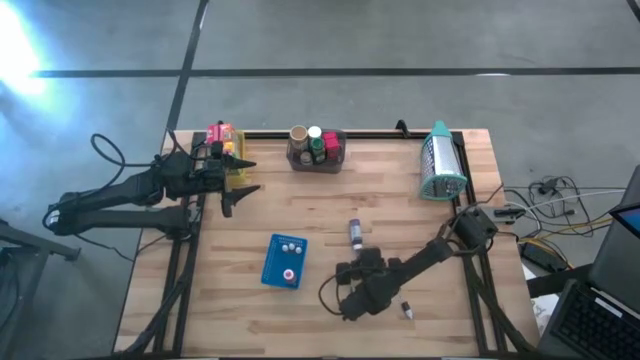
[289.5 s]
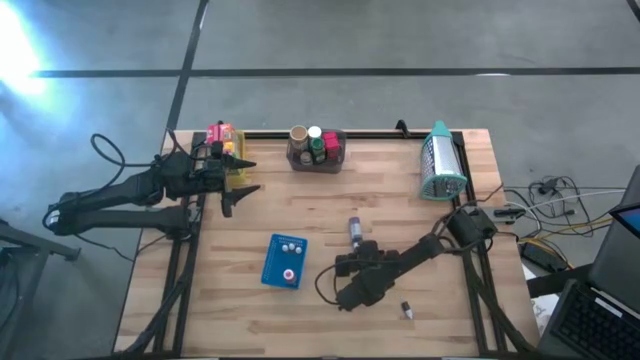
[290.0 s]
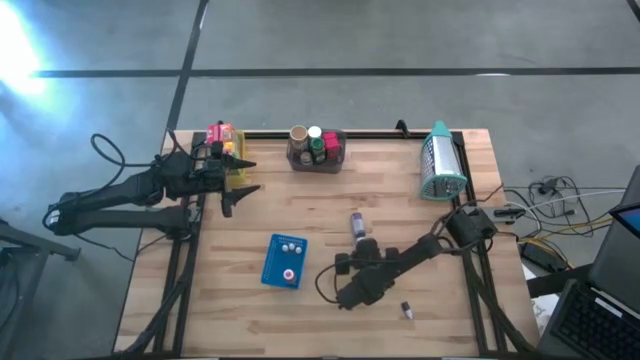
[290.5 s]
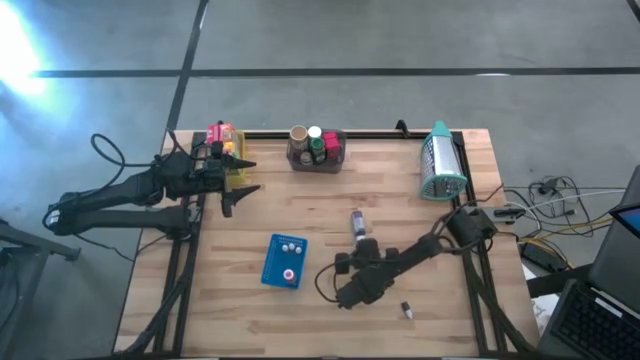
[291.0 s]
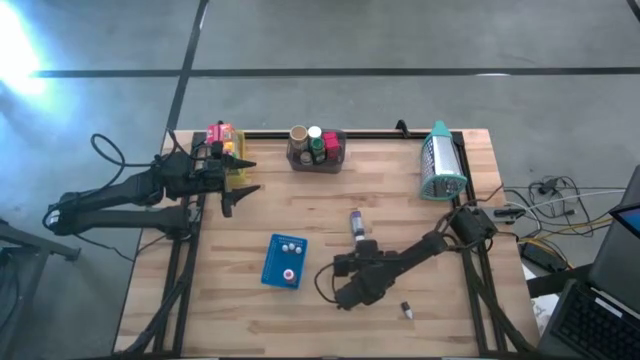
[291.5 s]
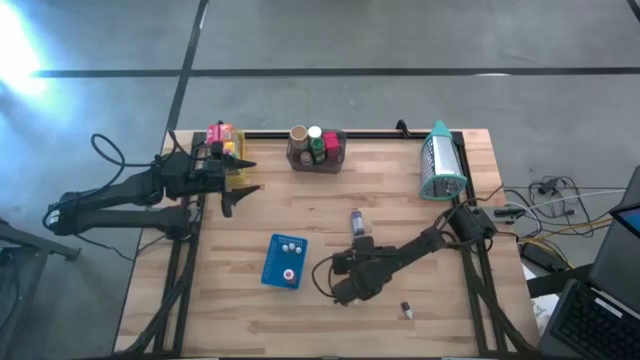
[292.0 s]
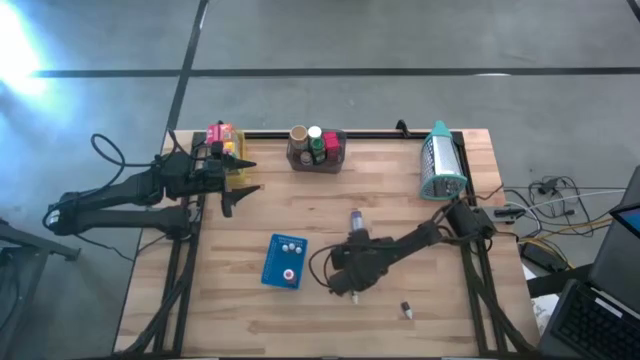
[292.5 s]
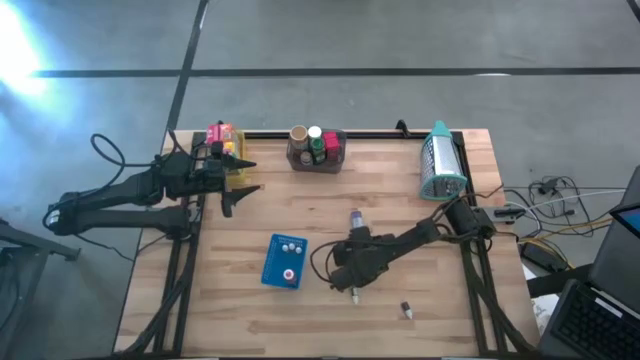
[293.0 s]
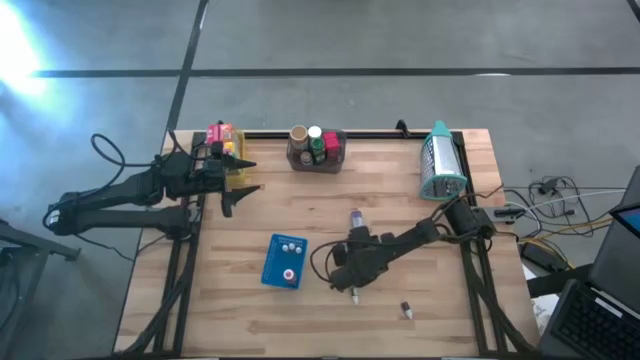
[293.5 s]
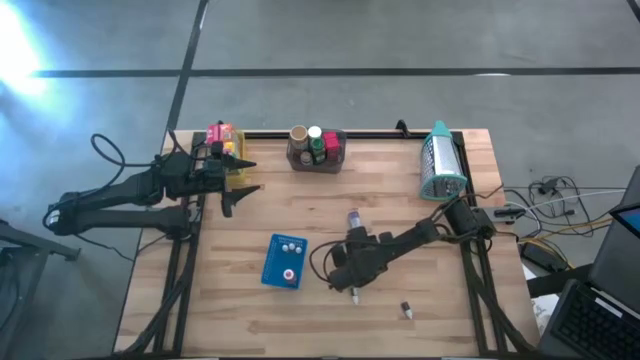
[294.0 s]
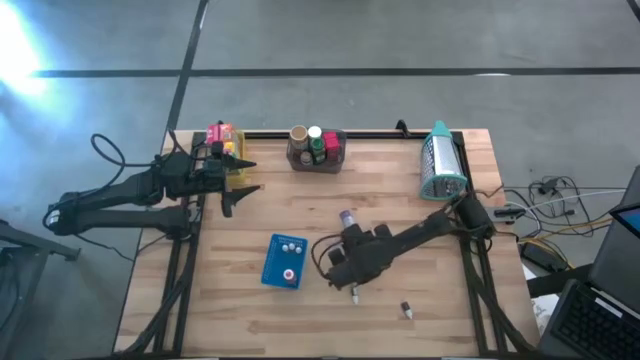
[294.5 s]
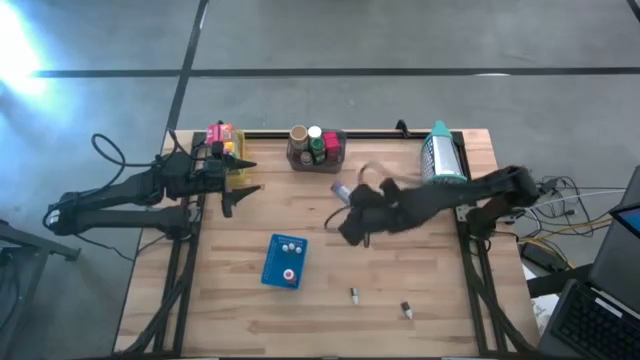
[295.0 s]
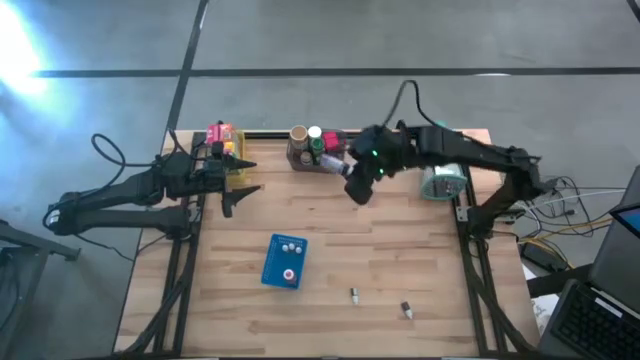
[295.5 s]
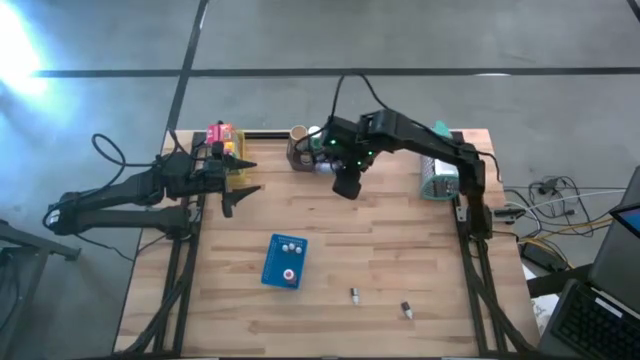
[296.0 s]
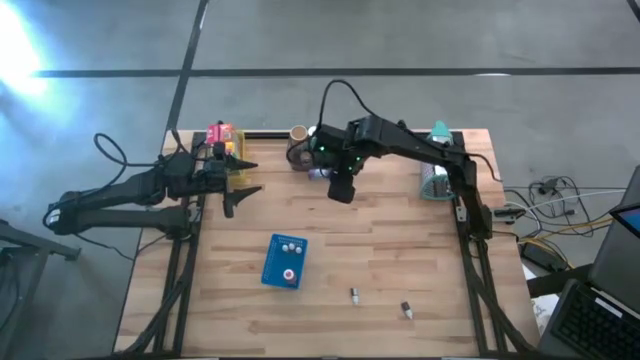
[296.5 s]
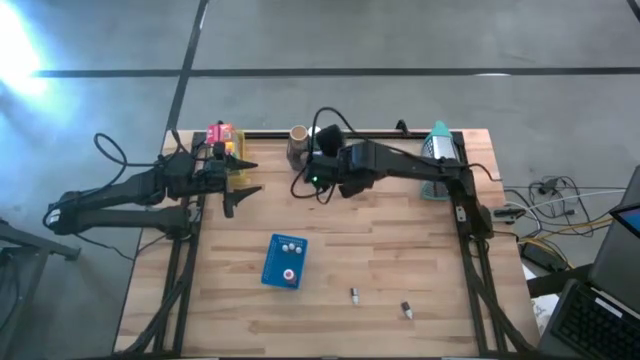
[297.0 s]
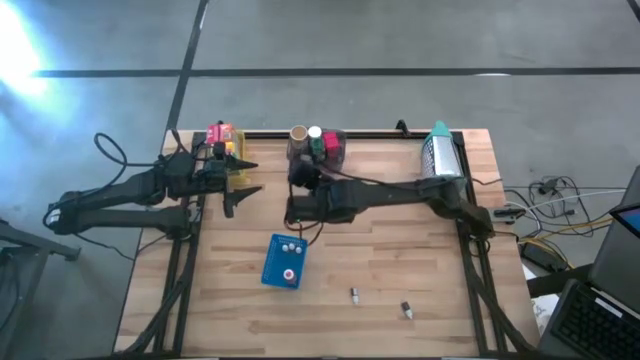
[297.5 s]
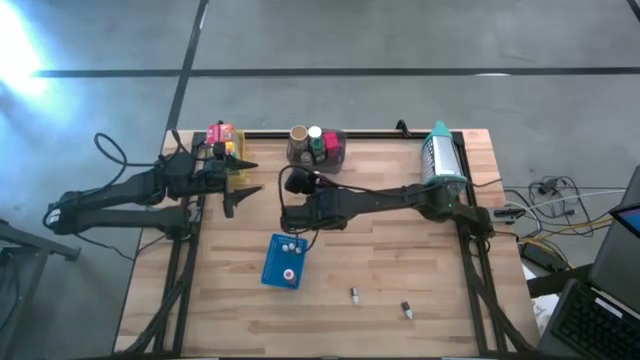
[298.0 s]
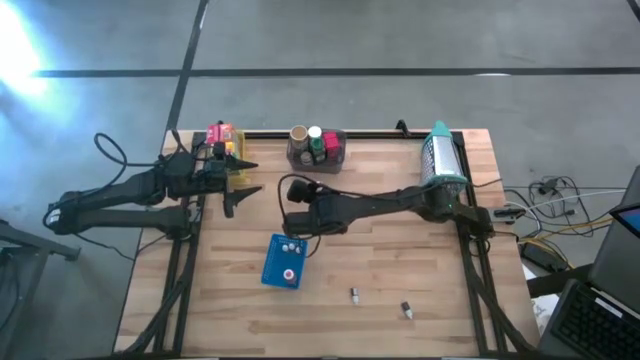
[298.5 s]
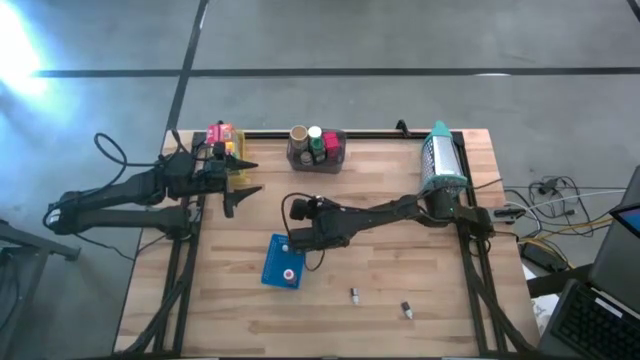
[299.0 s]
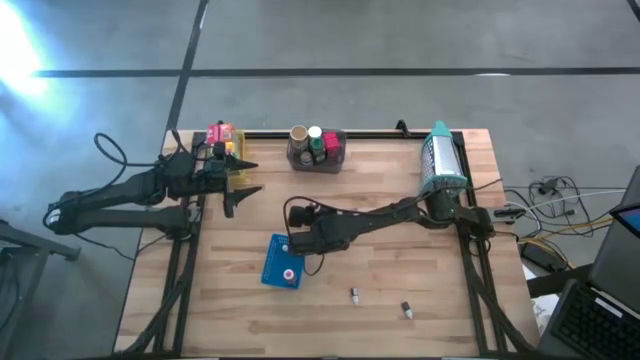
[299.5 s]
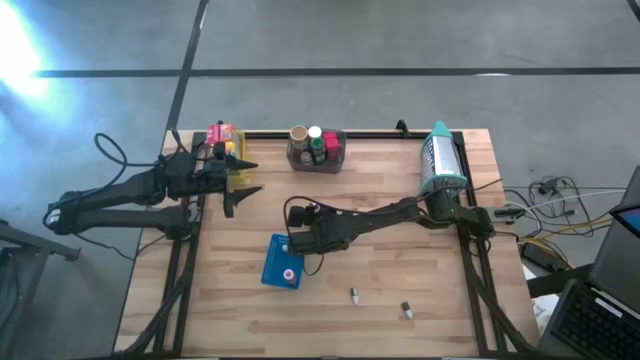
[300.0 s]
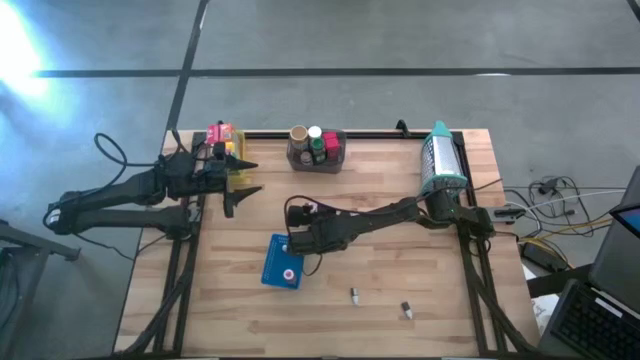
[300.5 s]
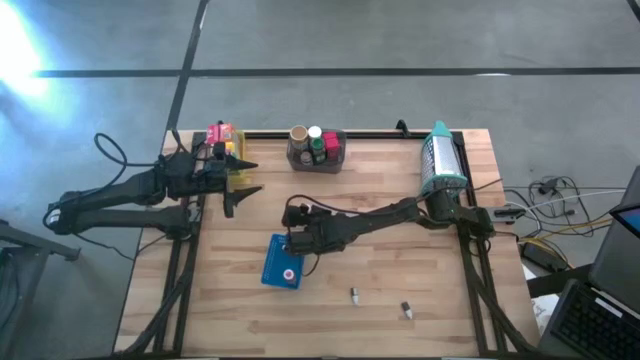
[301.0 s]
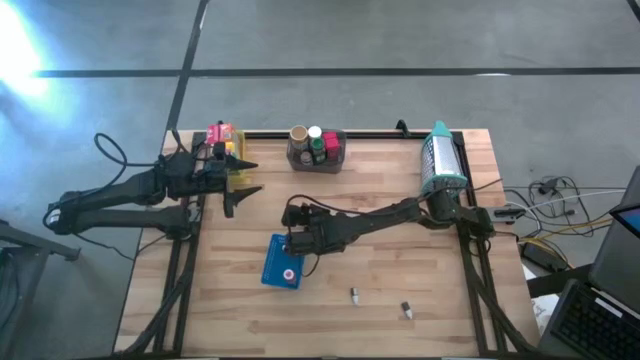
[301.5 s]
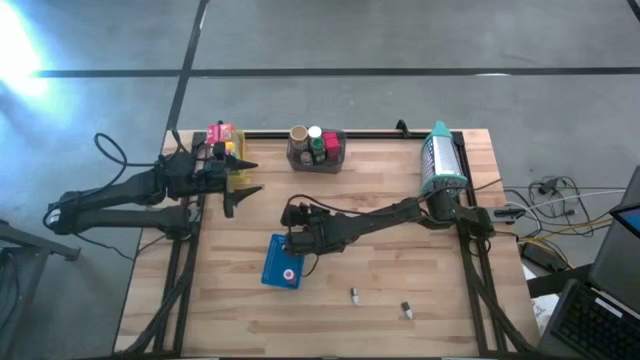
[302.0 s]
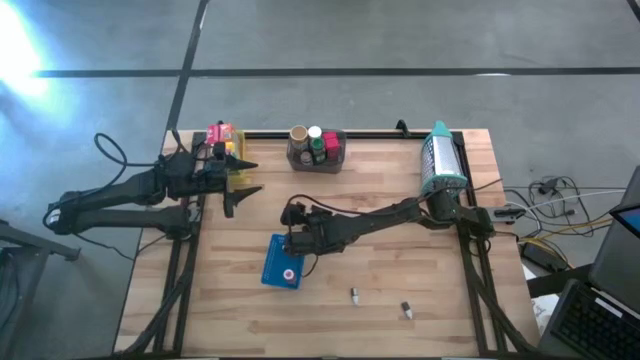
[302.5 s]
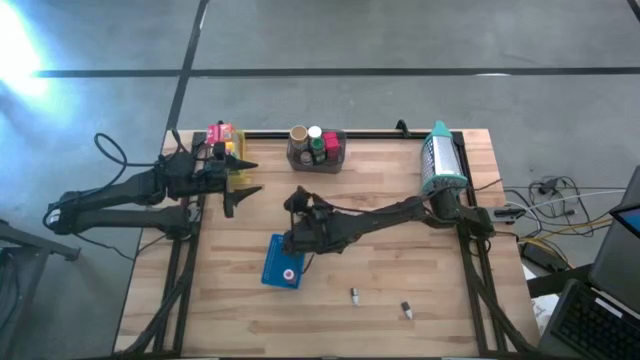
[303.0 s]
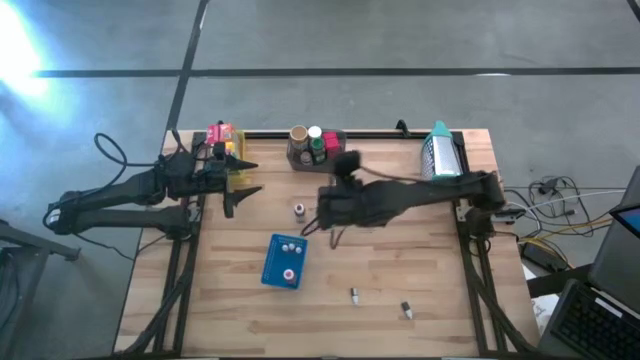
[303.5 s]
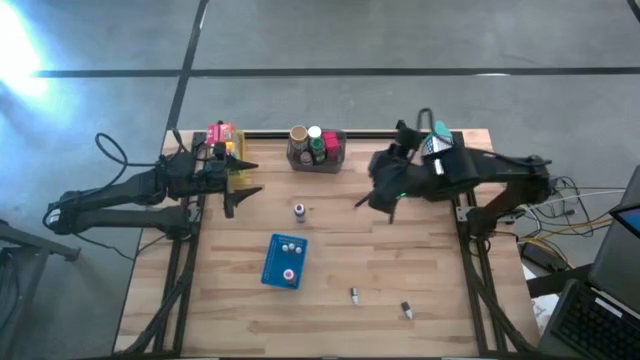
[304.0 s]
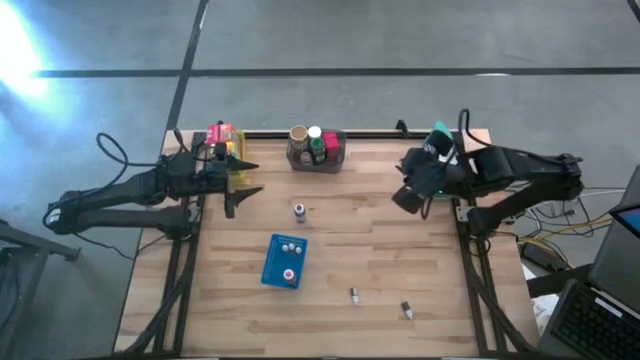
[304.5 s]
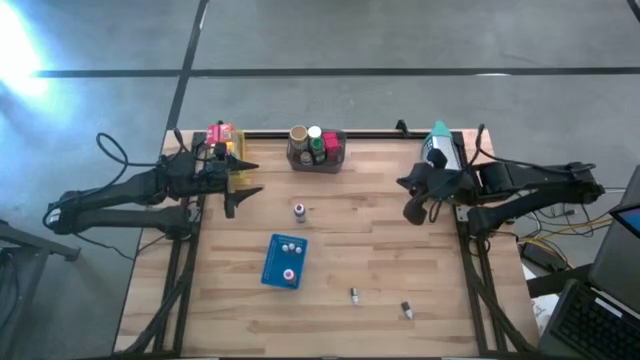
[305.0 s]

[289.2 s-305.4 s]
Task: Pick & Place Kitchen Items
Put the large purple food coloring bottle into the blue bin

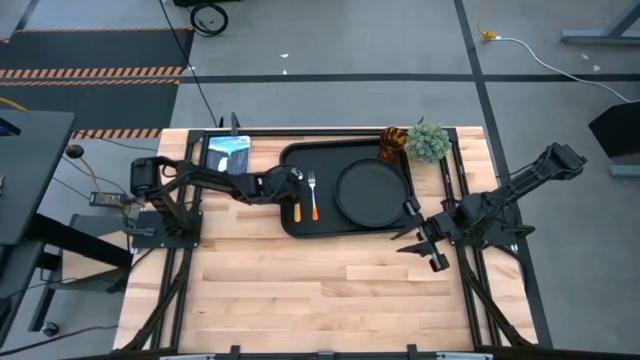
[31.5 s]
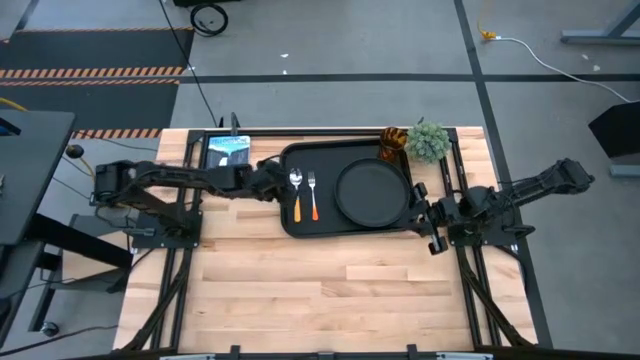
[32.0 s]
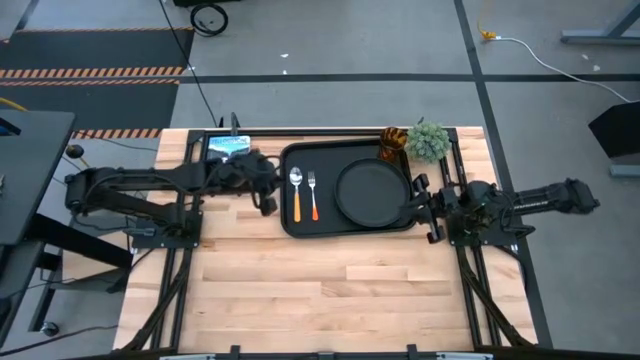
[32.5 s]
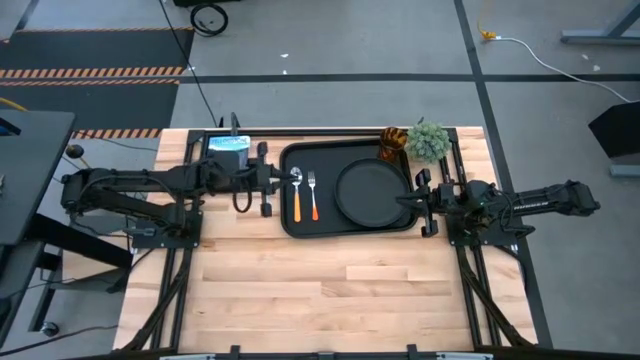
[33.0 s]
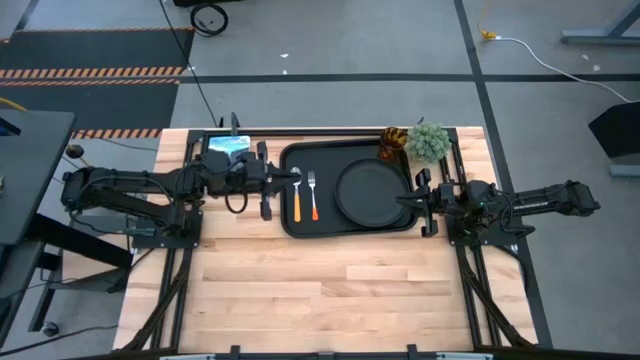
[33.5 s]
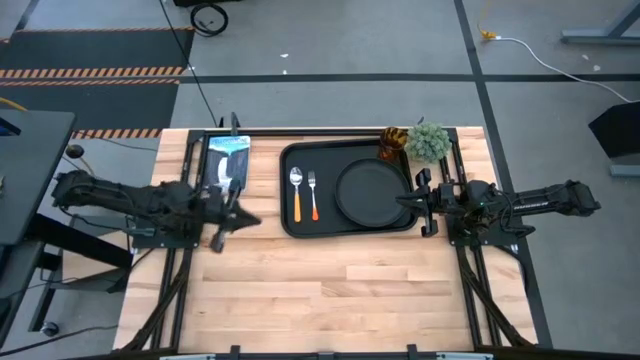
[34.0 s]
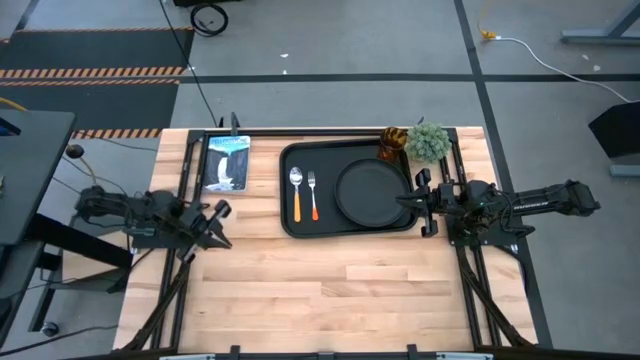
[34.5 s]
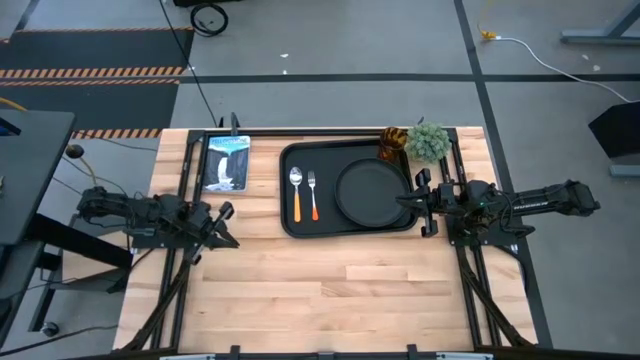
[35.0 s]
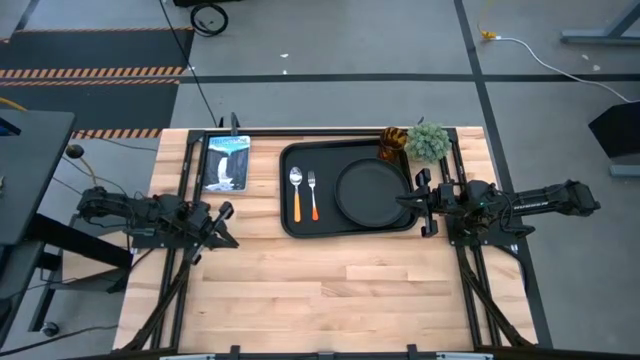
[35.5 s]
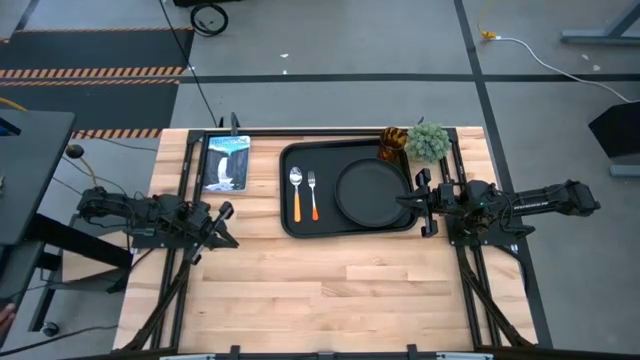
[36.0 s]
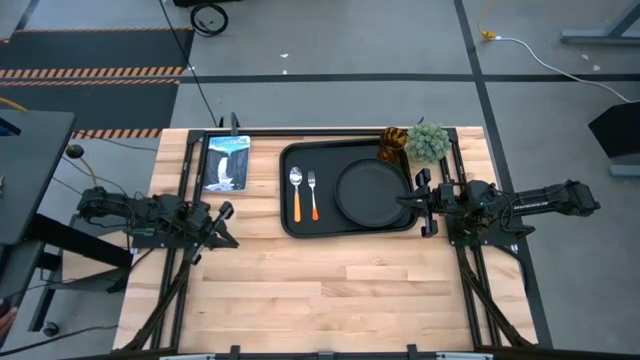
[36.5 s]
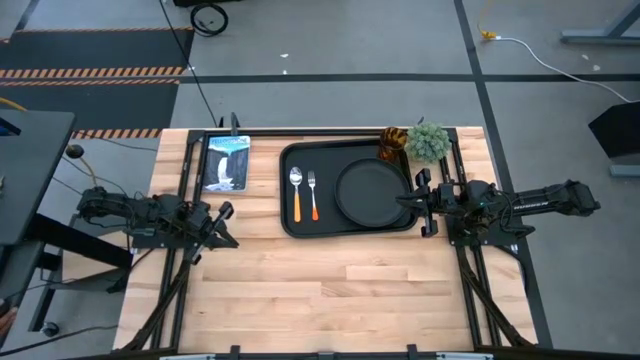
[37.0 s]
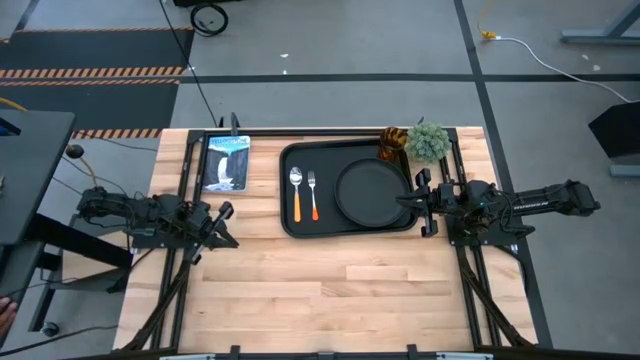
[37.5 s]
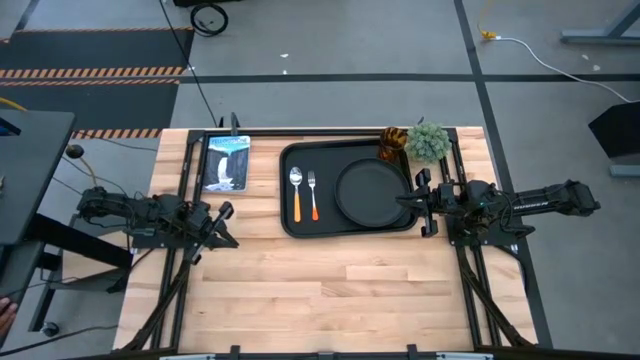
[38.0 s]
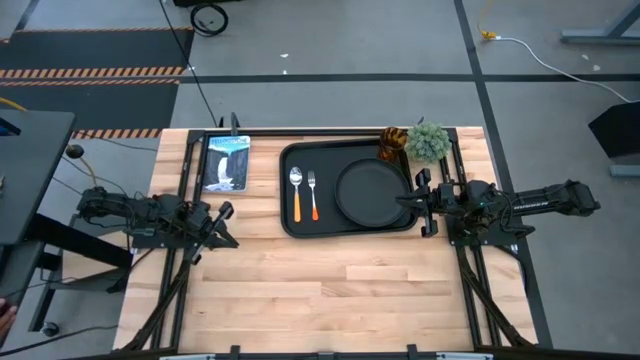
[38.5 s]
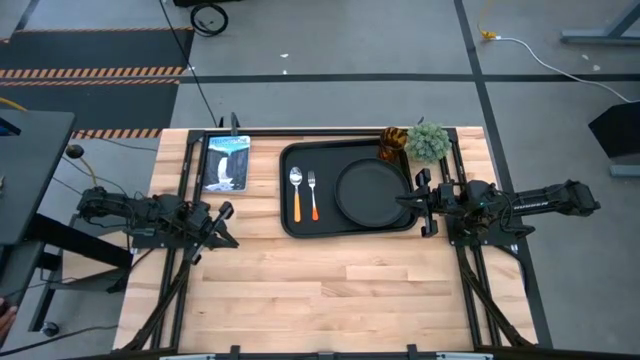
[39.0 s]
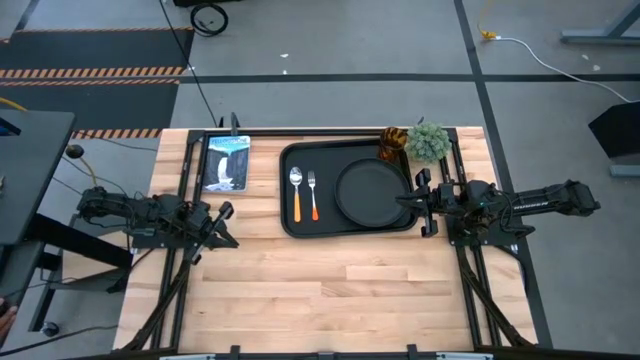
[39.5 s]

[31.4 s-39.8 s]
Task: Pick and place plate/cup/fork/spoon on tray
Return to Home Position
